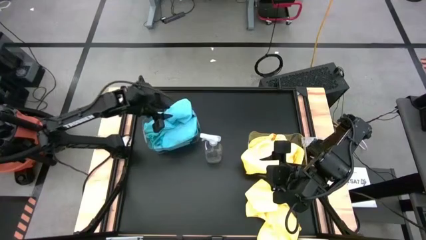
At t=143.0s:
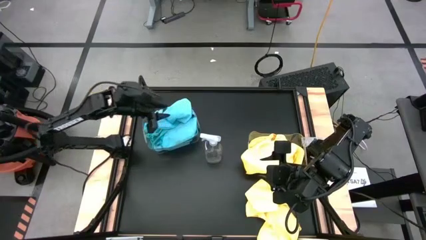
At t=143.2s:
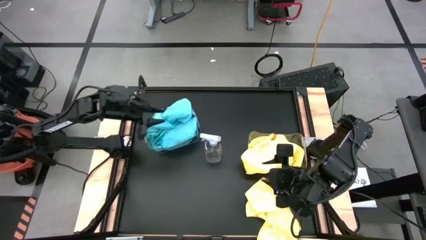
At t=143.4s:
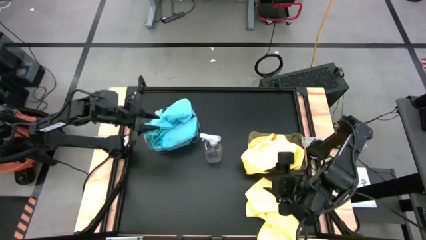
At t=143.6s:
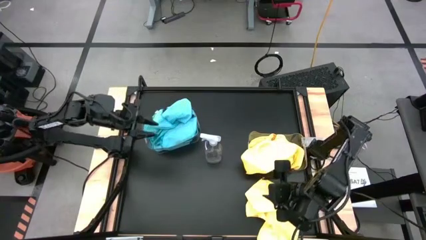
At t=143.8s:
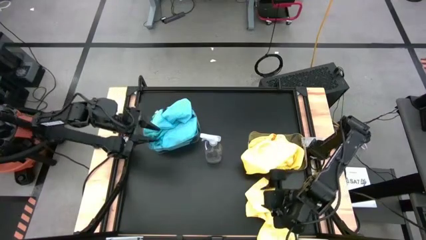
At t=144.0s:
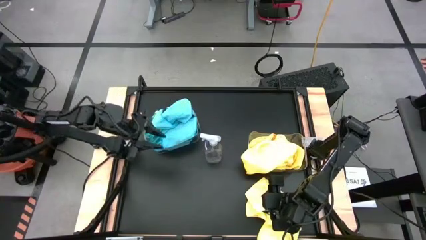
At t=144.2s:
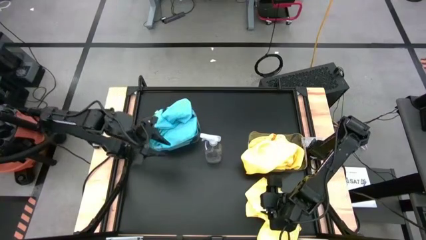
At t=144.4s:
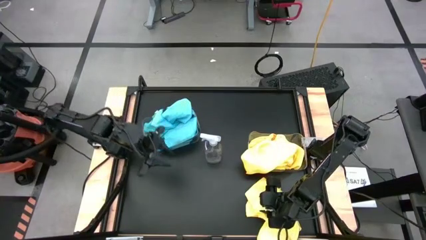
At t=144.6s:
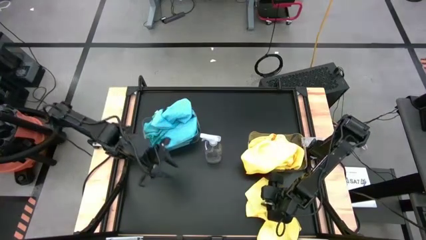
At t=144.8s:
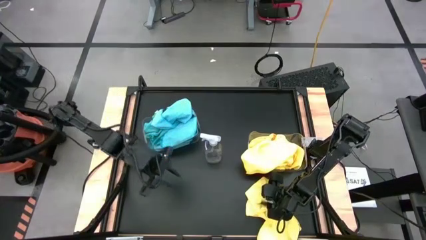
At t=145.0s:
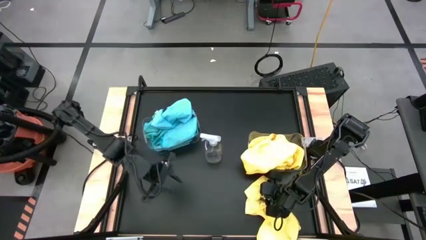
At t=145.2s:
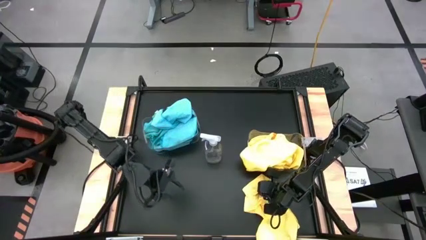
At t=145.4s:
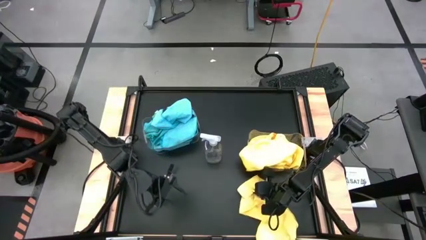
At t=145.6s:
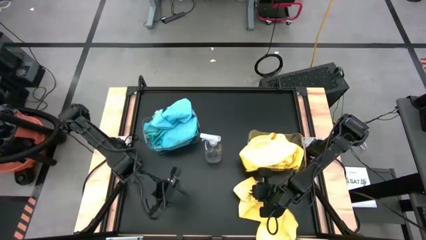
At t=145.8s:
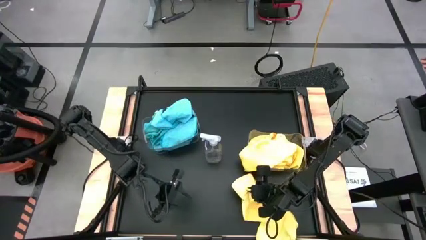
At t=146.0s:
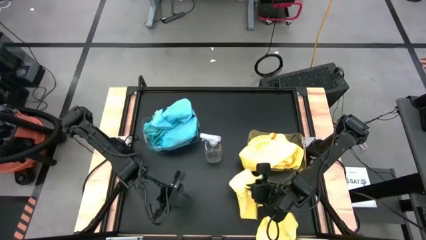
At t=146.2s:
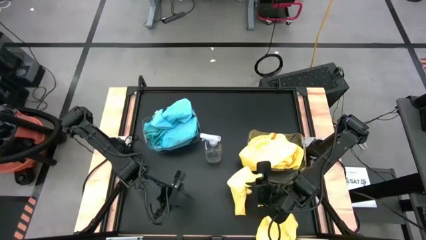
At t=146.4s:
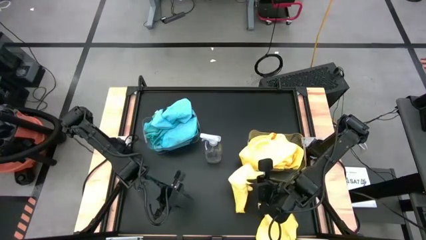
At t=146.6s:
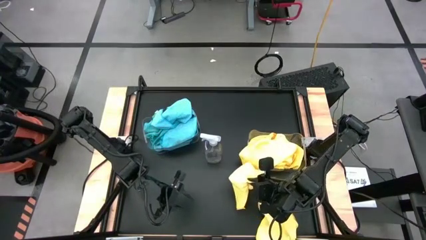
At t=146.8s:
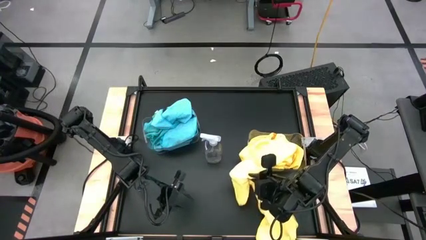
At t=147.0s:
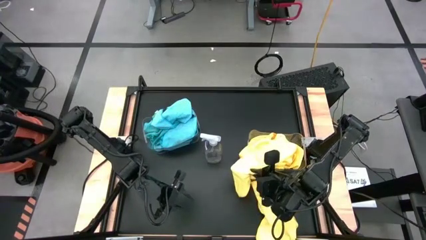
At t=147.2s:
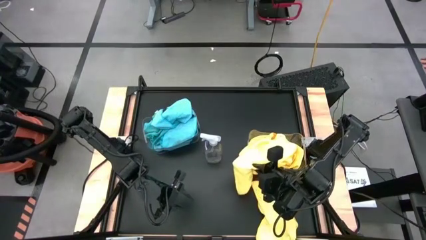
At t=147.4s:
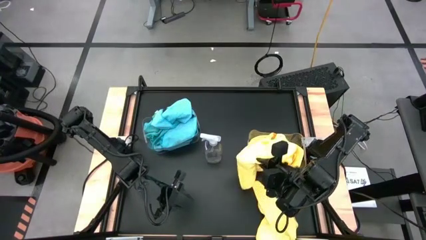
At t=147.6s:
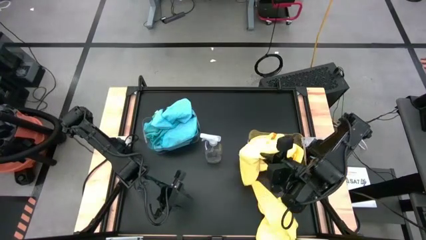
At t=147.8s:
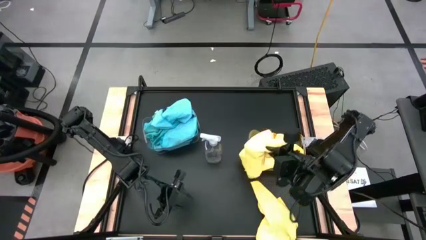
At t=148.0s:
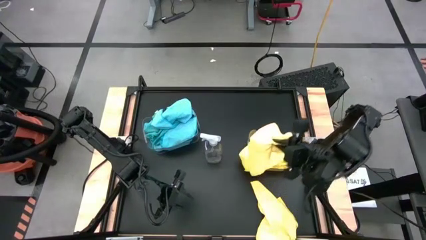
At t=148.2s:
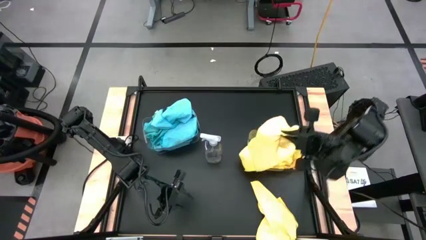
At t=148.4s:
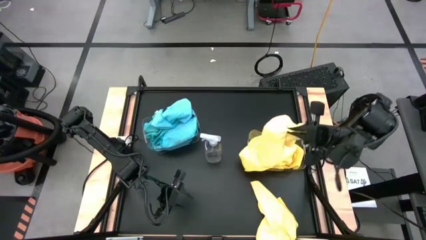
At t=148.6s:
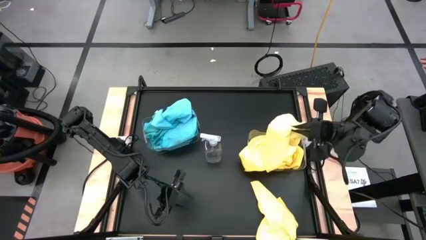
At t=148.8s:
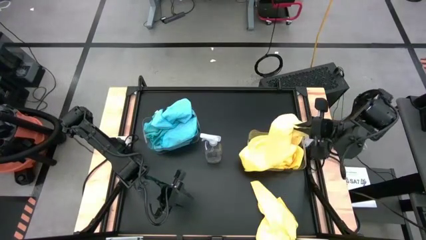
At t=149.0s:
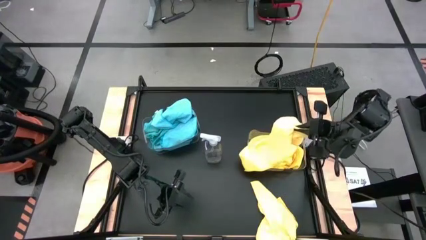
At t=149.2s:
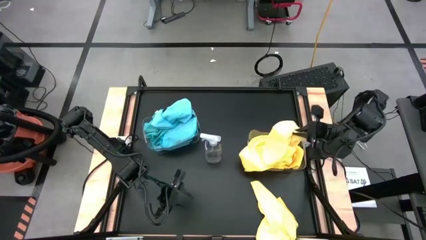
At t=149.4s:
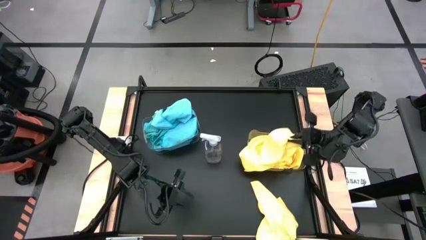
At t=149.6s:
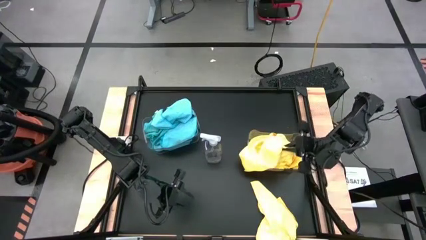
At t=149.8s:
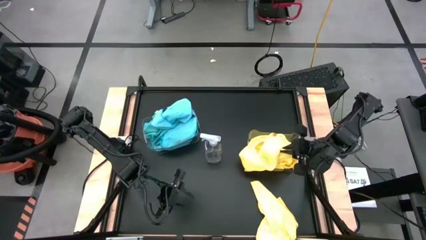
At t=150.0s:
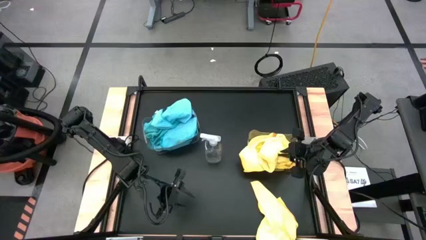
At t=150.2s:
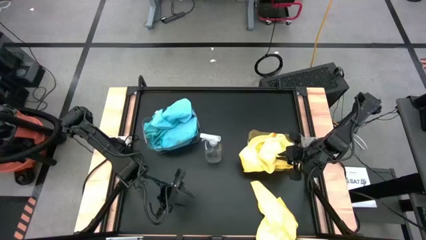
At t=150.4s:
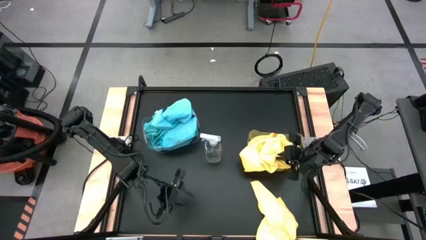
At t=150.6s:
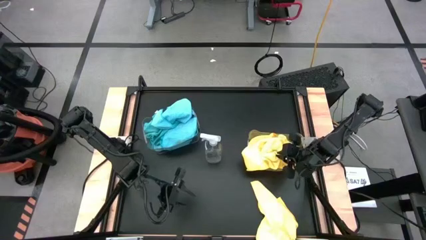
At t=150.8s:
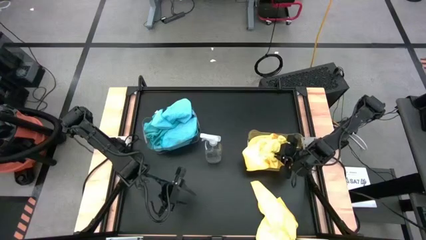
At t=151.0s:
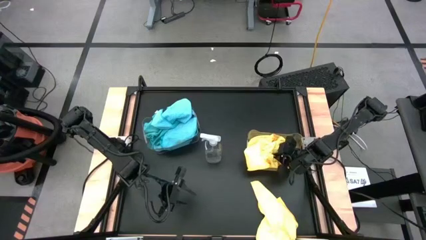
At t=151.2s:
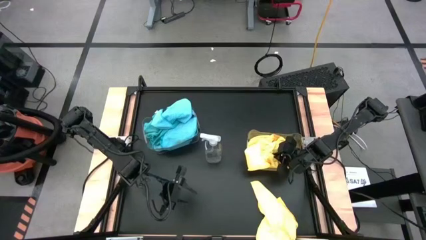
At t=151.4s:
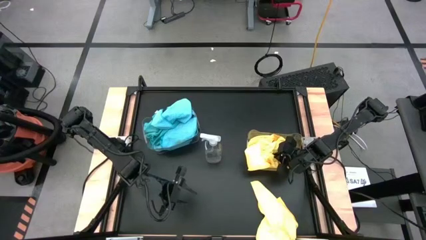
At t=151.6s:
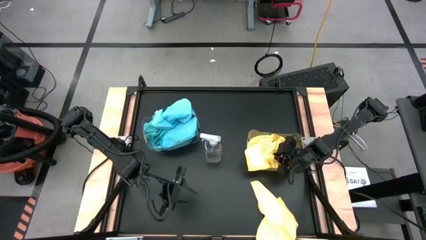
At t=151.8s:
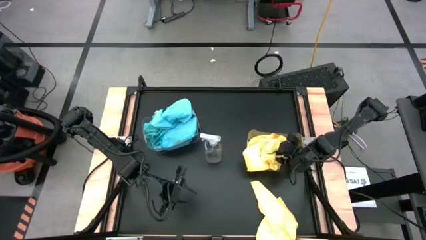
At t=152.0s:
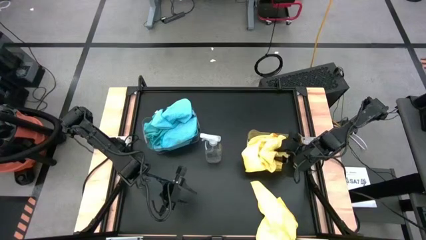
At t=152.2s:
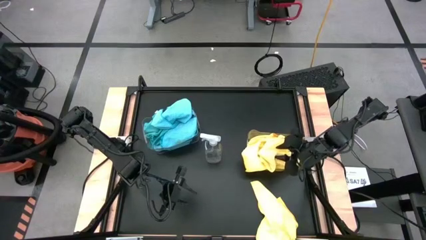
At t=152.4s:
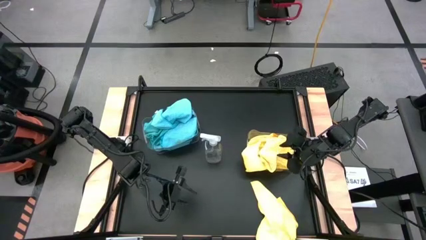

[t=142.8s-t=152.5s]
Task: Sort microfiber towel by color & place in baskets
Put the yellow microfiber towel into the bottom transparent bin

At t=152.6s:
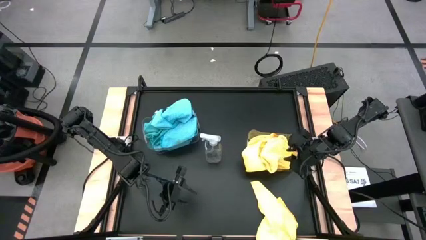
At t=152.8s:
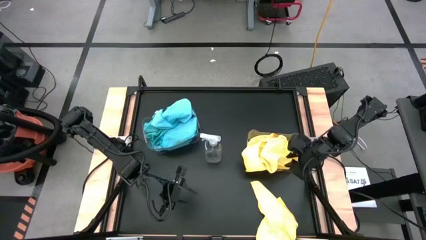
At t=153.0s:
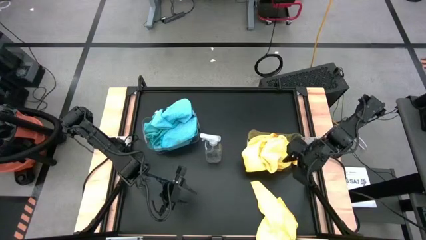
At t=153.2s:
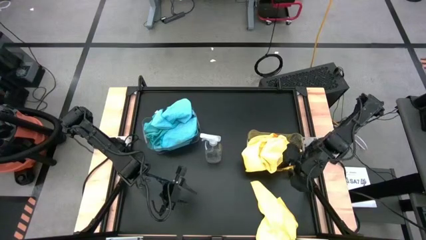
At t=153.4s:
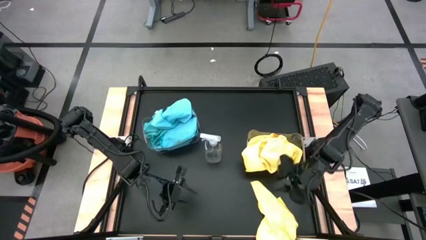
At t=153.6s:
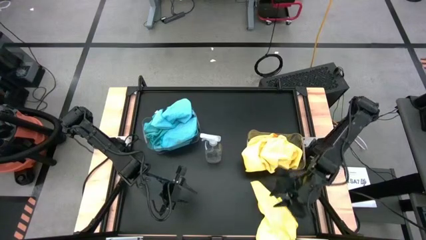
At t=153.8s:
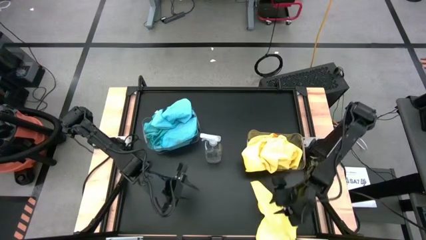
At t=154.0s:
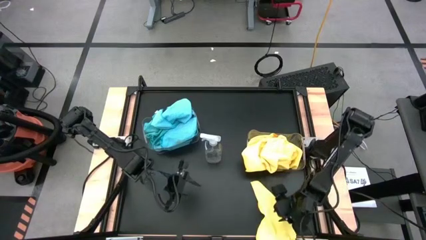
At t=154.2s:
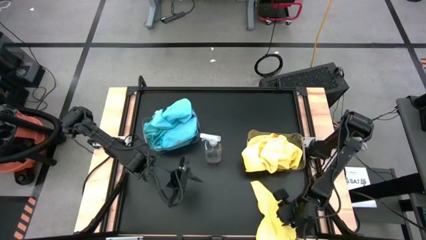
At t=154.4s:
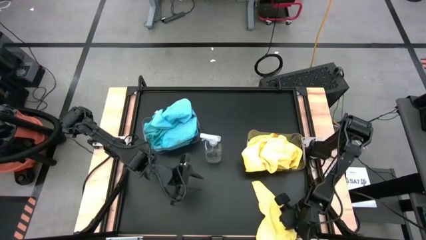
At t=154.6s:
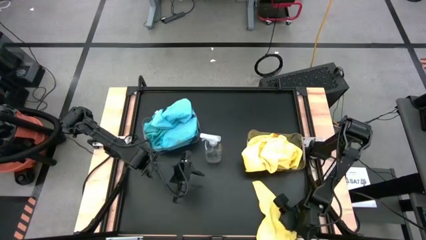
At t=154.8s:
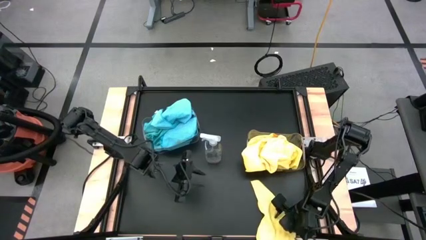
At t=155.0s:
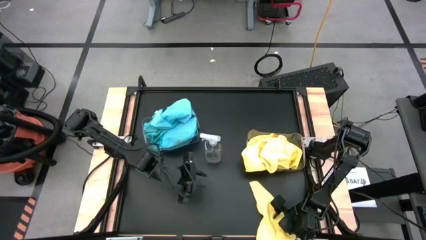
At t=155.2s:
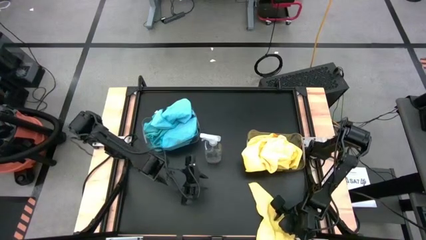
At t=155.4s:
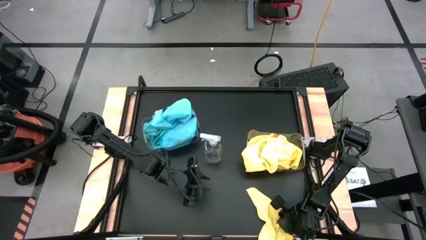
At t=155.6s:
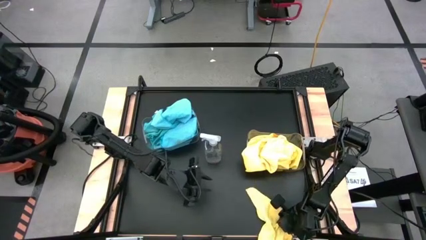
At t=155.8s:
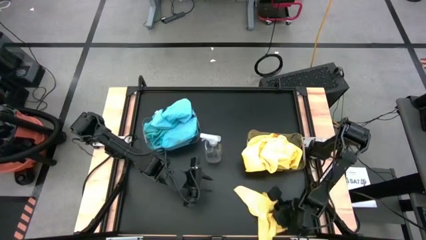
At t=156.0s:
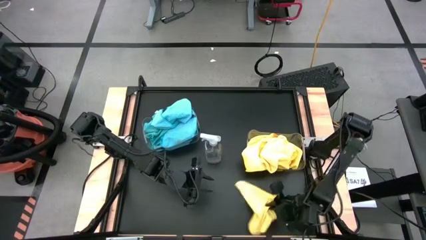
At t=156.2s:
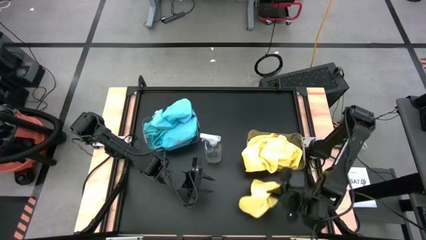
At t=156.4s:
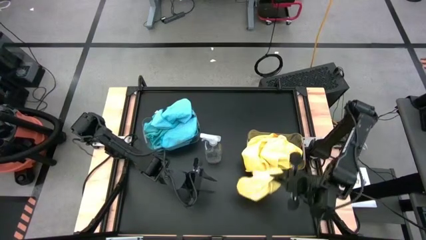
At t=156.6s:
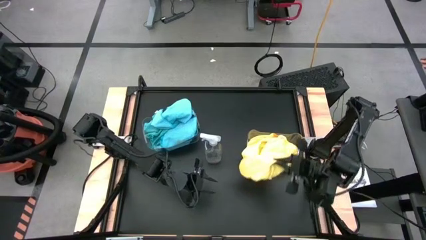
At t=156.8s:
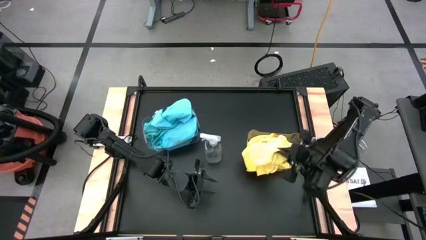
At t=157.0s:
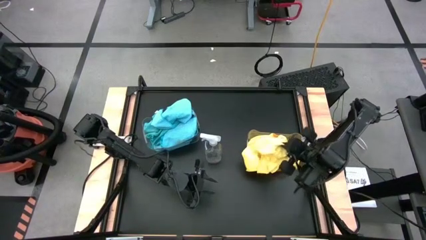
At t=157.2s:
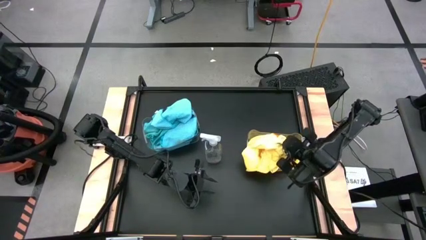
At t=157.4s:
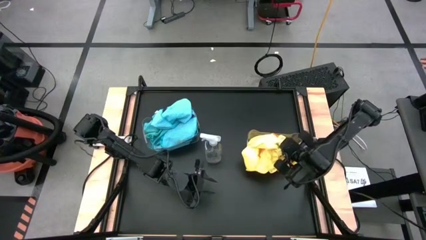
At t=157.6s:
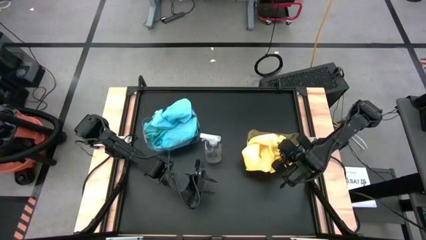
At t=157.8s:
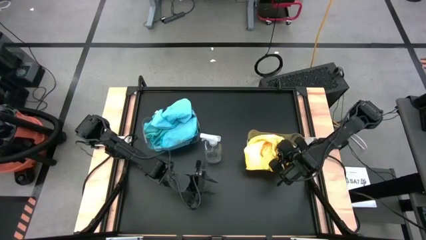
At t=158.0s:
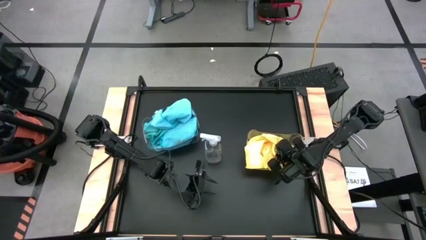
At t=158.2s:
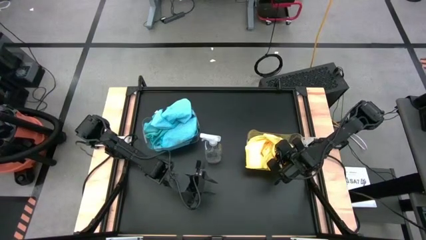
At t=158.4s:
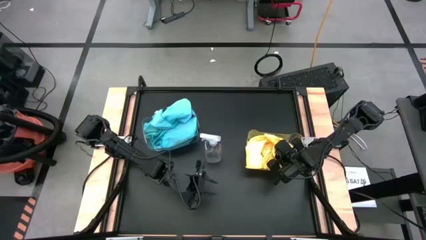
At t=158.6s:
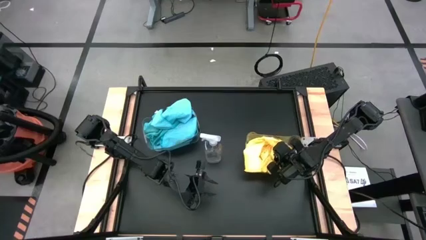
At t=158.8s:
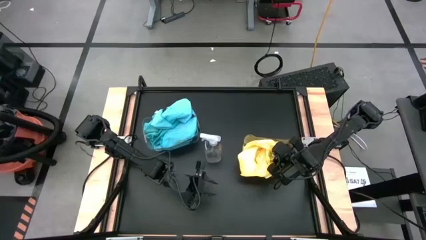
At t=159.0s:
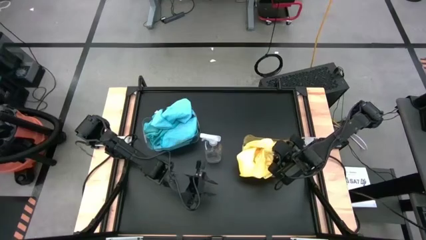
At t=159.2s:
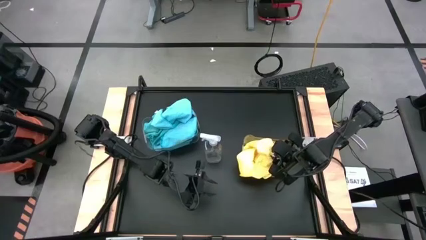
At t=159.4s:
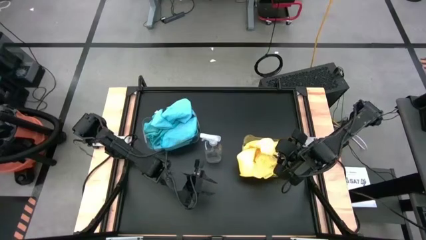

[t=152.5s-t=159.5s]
Put the yellow microfiber towel into the bottom transparent bin
